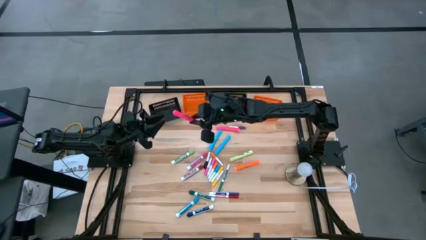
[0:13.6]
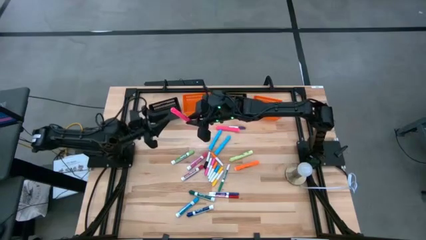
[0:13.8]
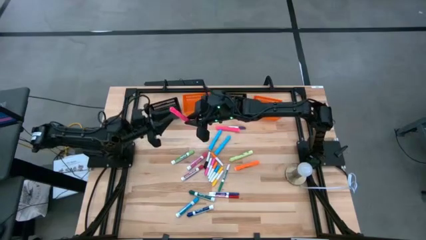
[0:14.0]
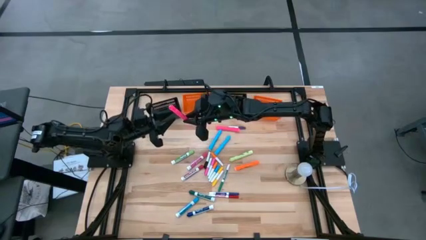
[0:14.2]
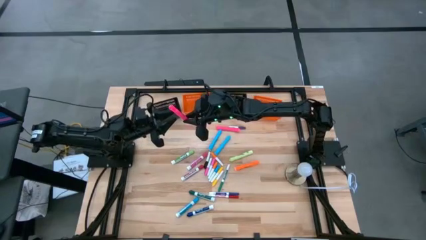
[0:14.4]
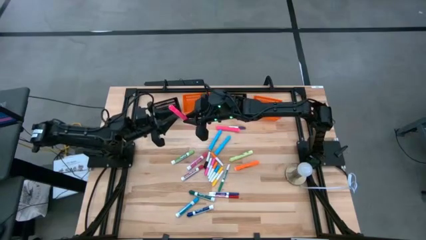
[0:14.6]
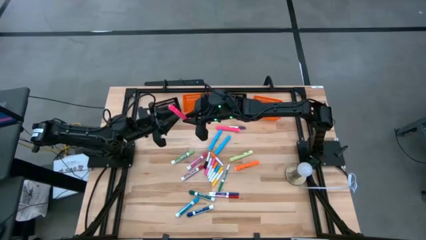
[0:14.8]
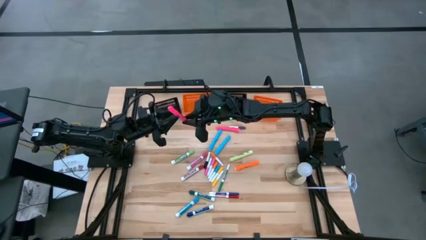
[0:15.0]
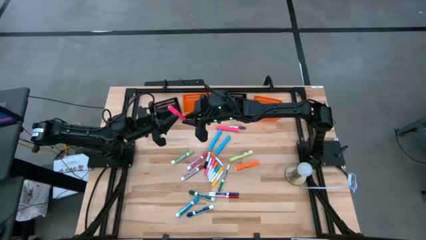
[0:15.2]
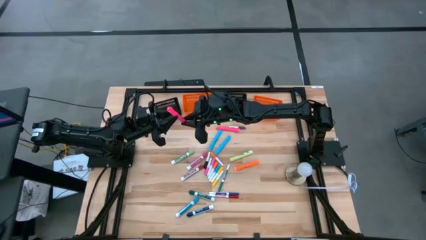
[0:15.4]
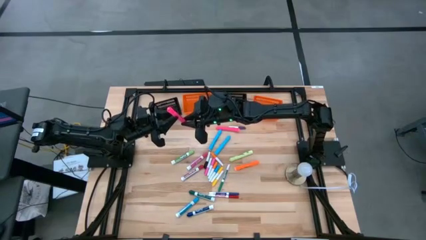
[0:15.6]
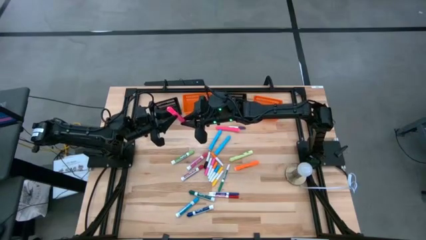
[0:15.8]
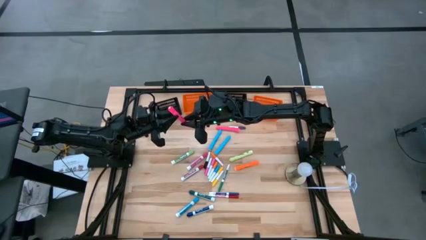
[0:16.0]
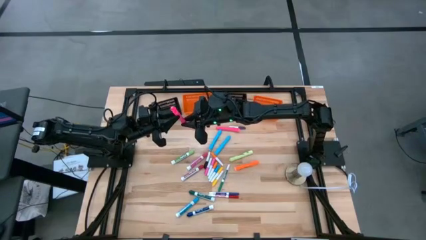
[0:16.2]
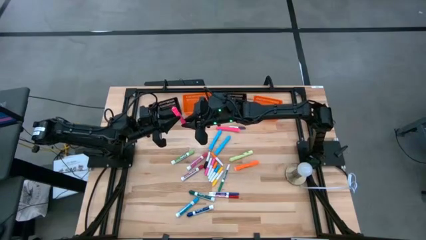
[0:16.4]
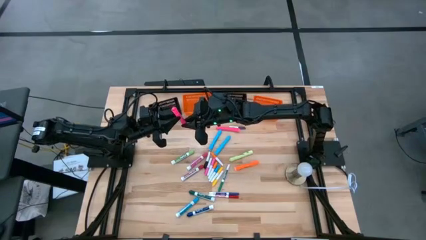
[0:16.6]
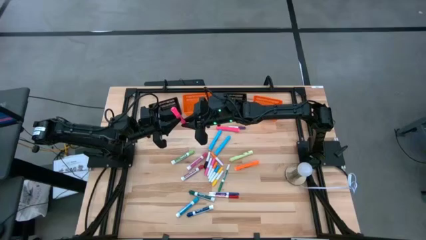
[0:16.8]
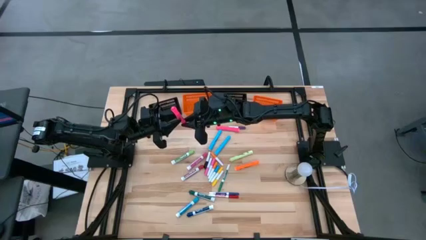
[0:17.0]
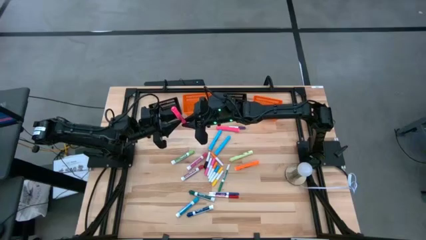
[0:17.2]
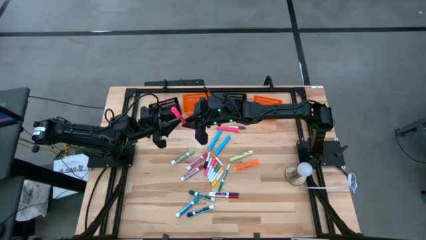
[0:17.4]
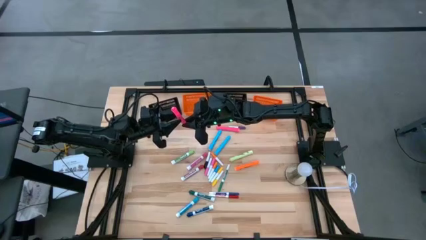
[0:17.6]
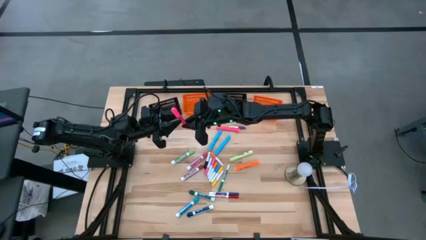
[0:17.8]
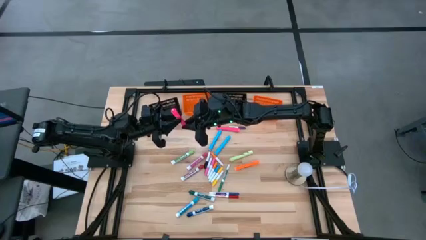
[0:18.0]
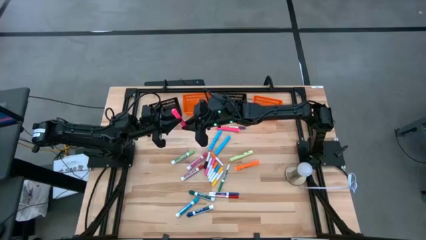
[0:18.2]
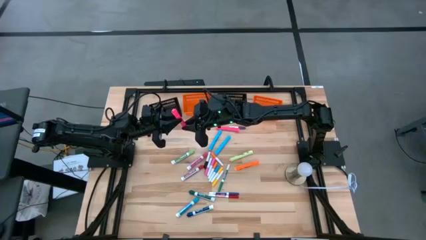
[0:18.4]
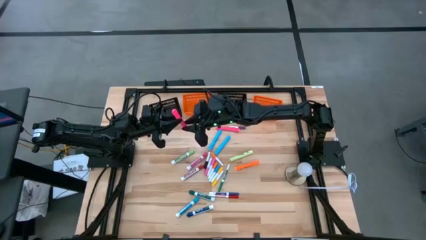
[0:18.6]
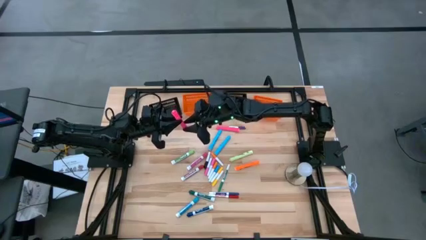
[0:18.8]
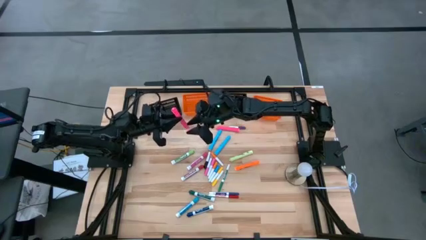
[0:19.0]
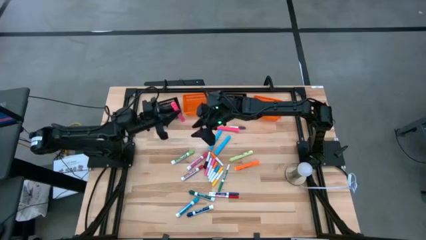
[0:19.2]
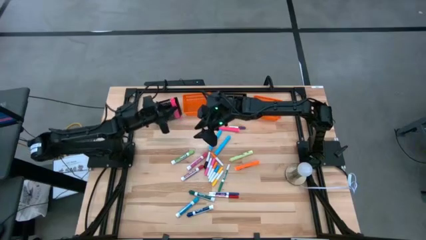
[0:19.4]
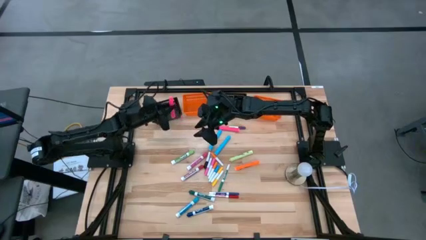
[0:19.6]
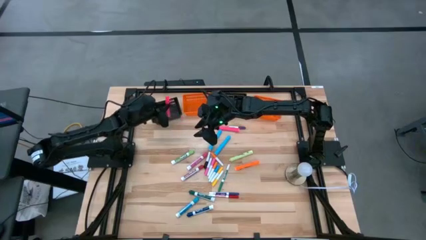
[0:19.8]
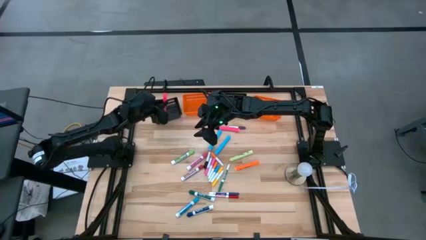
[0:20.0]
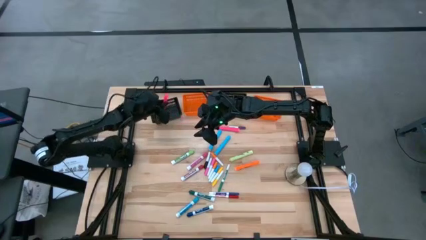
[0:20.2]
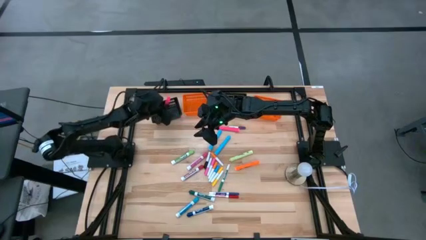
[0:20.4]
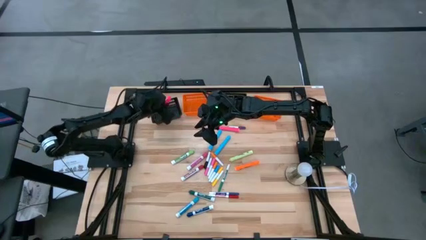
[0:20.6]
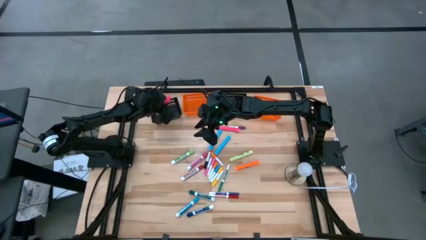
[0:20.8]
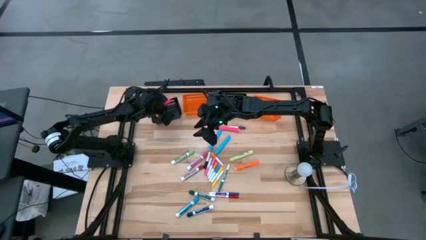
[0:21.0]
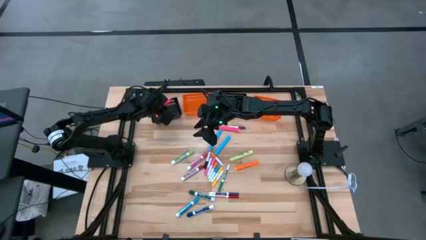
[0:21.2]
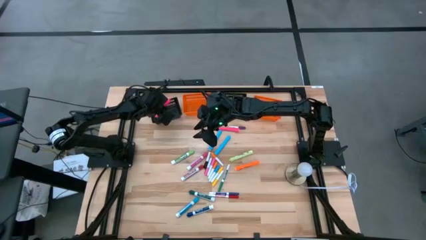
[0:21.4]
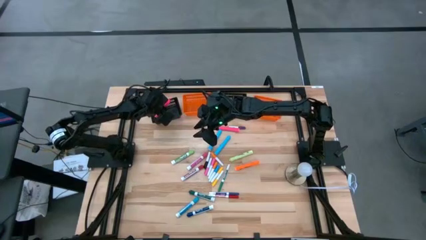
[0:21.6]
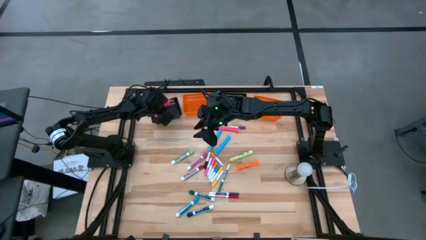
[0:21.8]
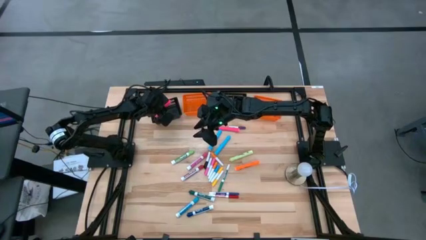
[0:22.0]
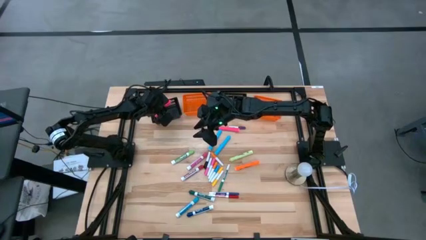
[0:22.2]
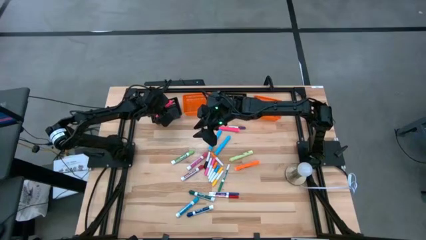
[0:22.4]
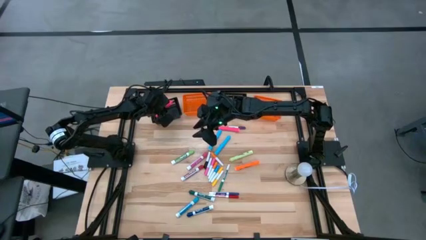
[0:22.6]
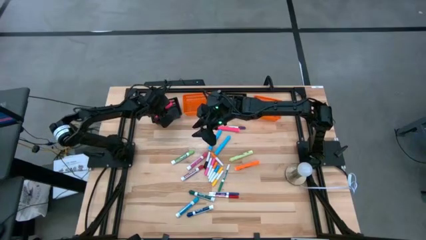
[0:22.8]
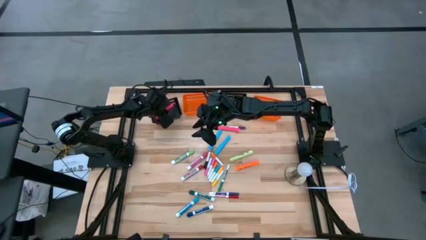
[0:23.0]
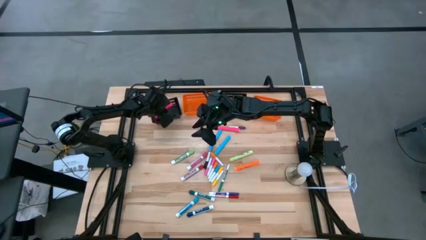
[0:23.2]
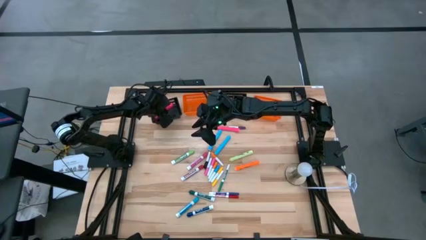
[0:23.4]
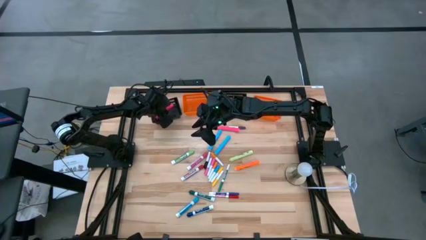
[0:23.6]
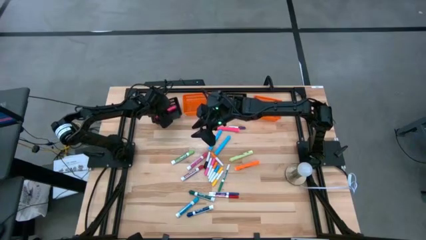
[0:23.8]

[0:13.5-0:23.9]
Task: Pick & Place Markers
Put the bottom pink highlighter into the left black bin

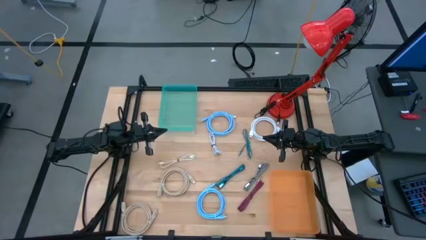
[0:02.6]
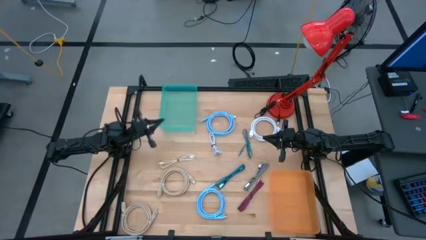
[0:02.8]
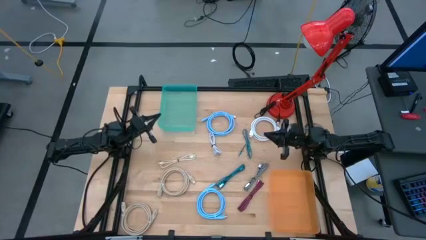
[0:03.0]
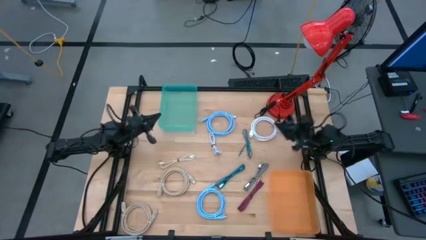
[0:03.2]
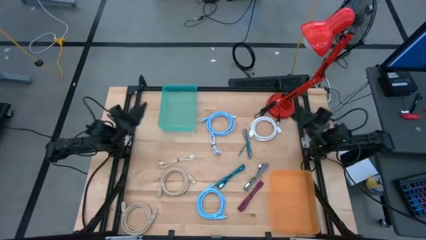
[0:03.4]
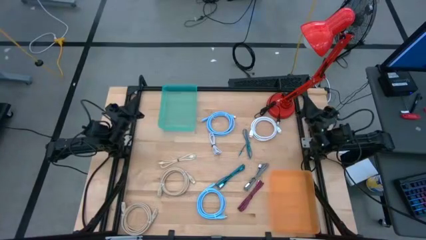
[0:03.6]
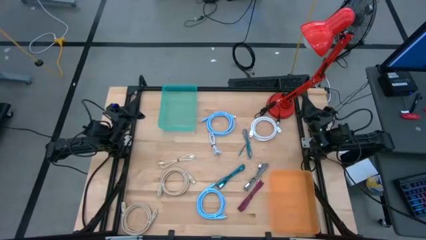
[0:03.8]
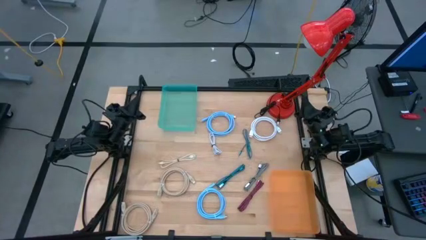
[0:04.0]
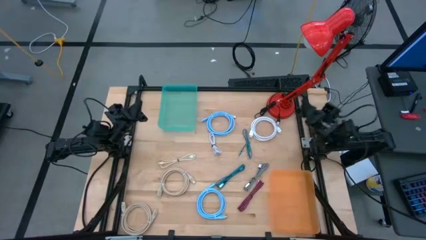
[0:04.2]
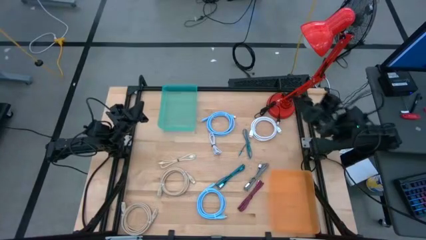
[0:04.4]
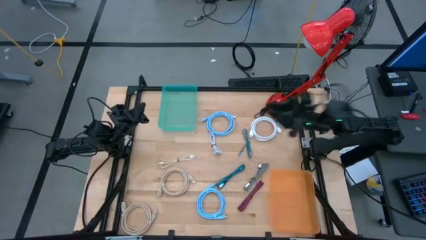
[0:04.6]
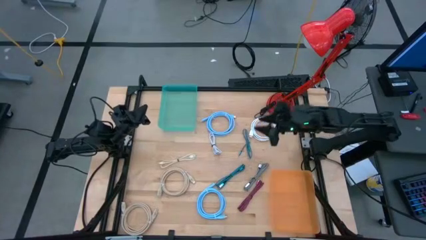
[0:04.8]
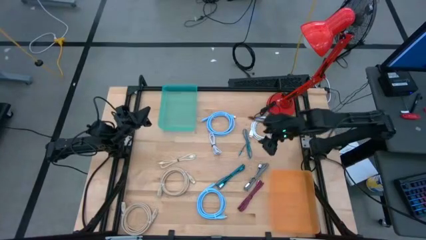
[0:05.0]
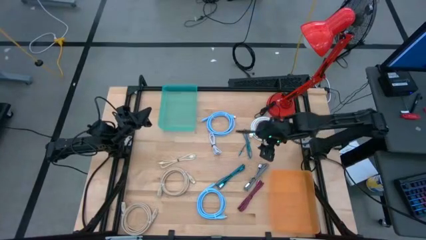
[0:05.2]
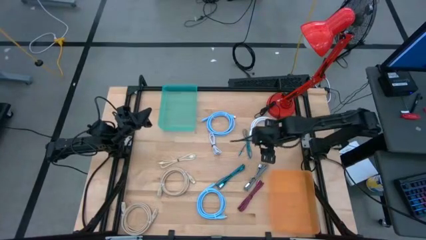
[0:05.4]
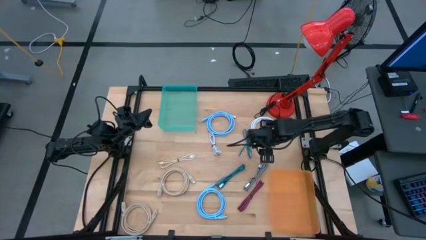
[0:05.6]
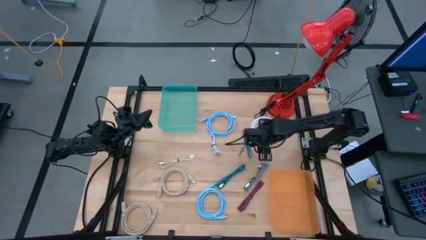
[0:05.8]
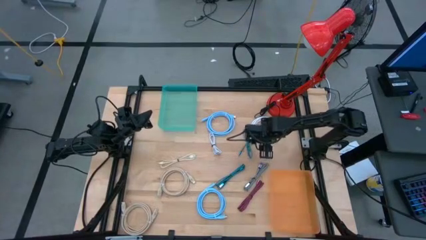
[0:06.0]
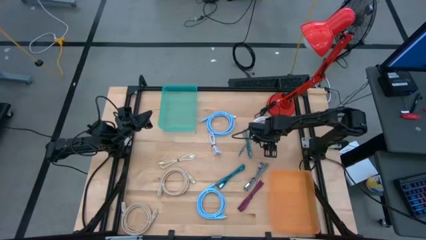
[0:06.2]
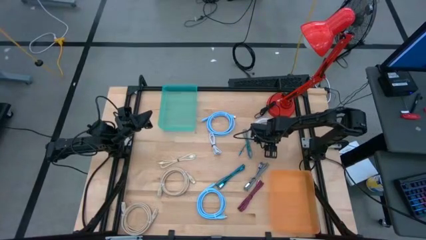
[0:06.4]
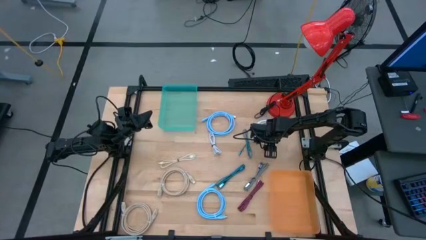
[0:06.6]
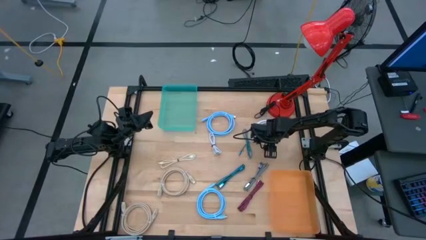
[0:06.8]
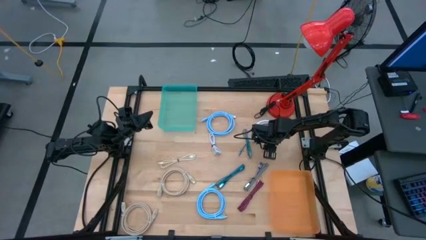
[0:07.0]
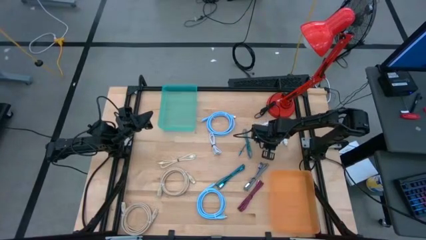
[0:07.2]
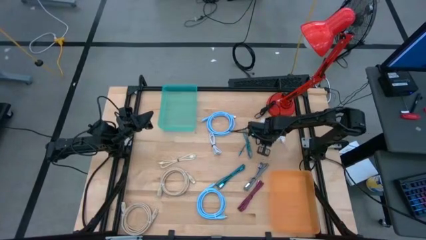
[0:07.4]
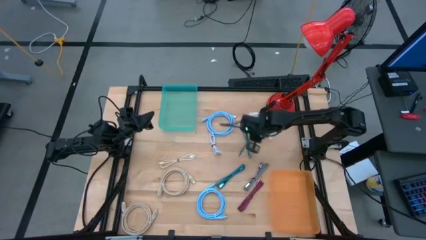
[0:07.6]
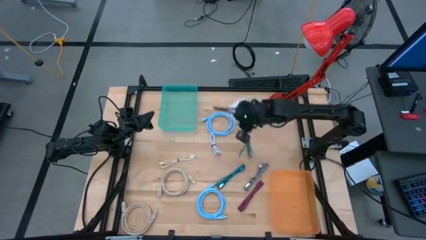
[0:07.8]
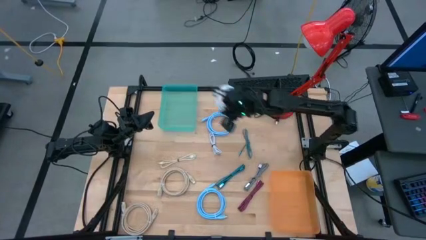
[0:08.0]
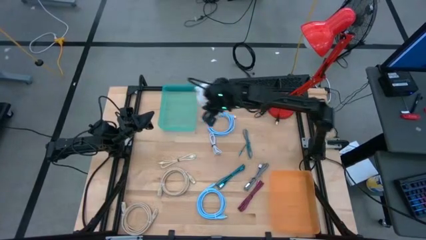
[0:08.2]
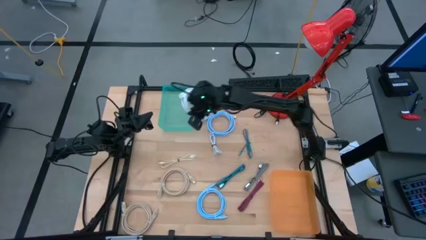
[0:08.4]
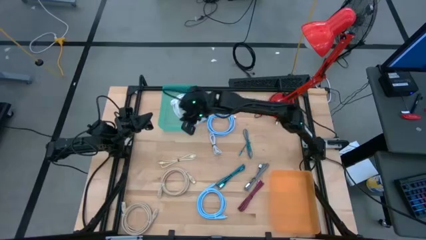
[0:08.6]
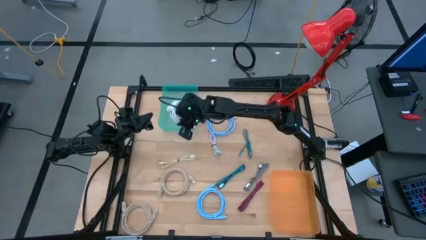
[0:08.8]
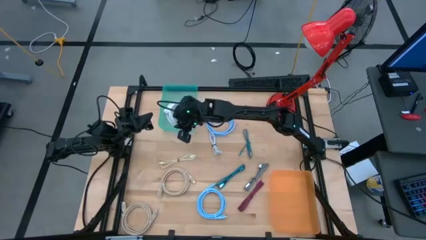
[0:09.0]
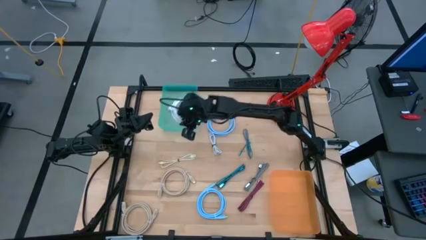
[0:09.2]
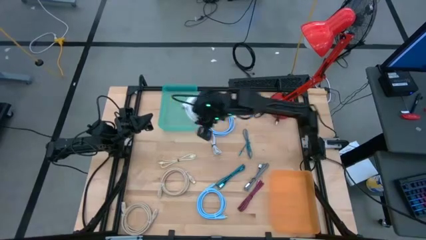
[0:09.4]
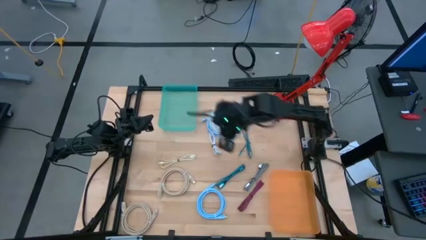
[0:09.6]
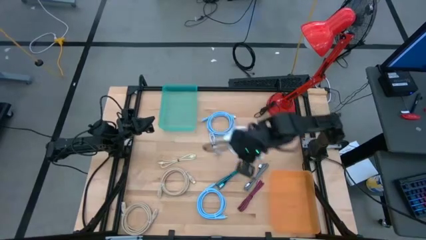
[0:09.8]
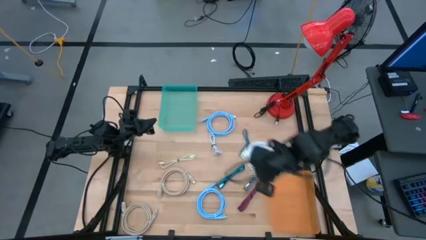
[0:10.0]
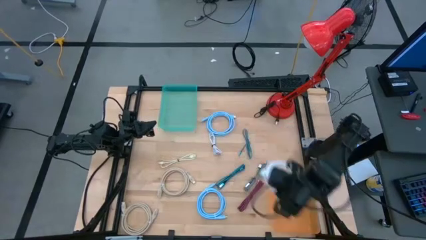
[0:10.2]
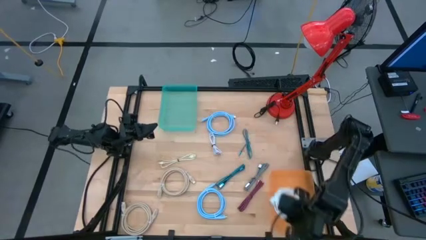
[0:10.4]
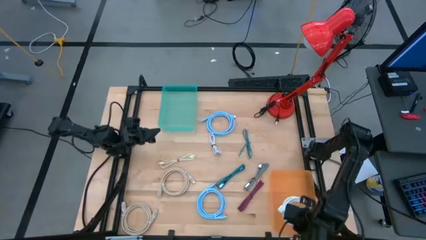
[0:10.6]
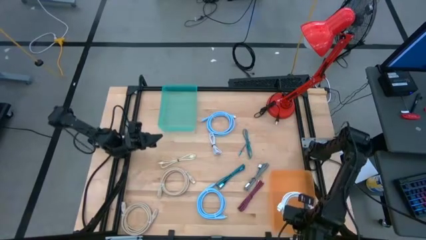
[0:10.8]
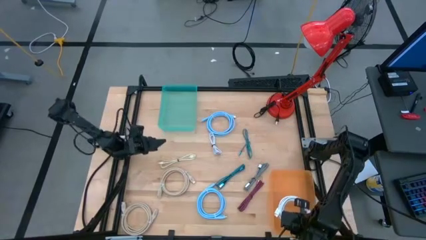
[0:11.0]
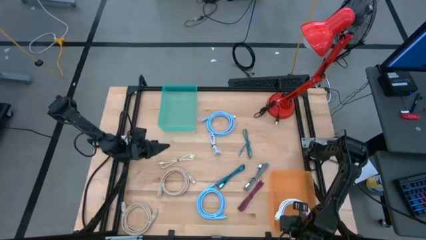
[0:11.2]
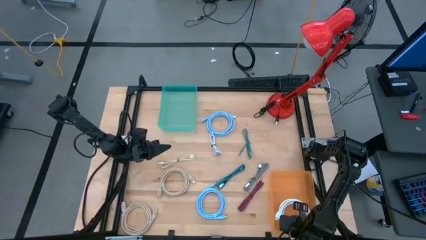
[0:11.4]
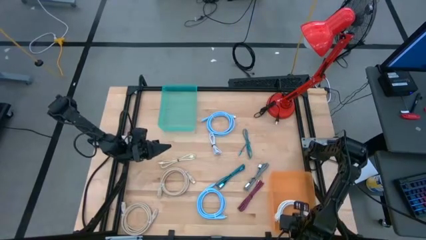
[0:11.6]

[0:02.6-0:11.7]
Task: Pick & Place USB Port
Put the white HDMI cable into the orange bin
